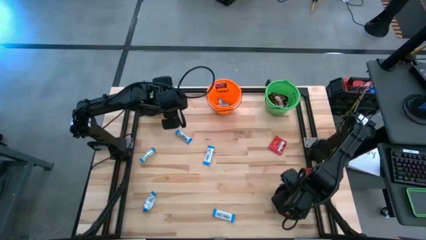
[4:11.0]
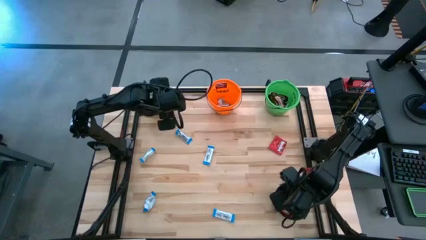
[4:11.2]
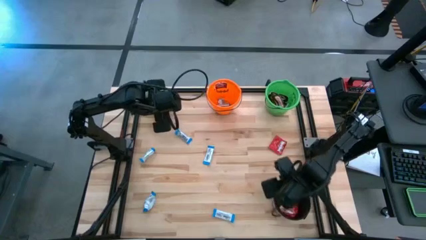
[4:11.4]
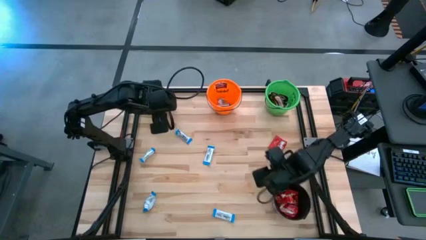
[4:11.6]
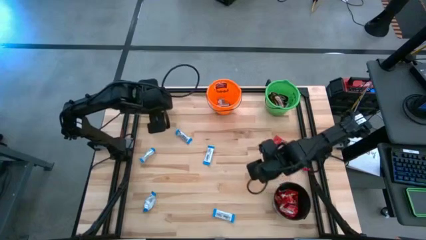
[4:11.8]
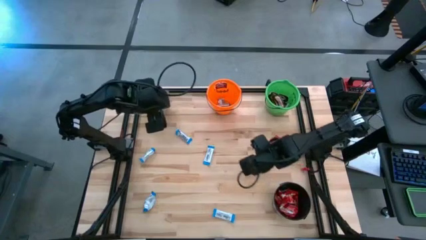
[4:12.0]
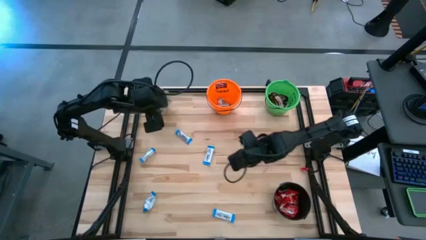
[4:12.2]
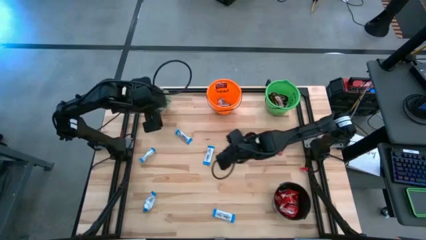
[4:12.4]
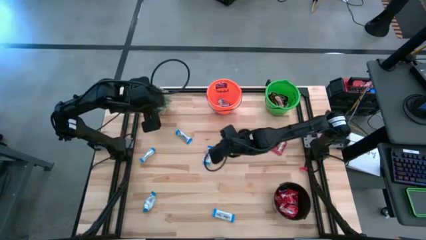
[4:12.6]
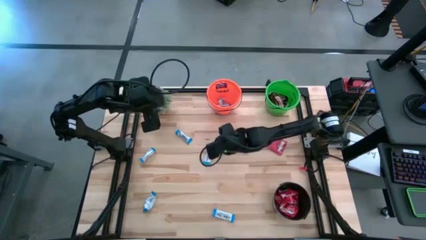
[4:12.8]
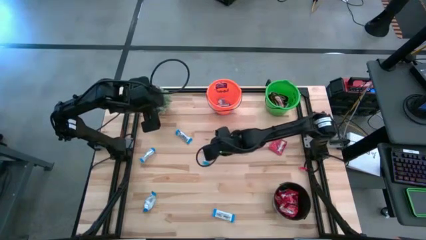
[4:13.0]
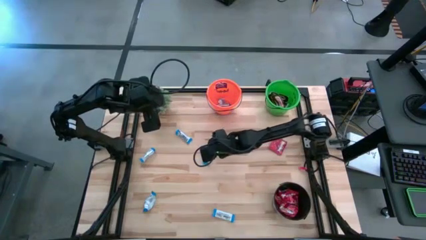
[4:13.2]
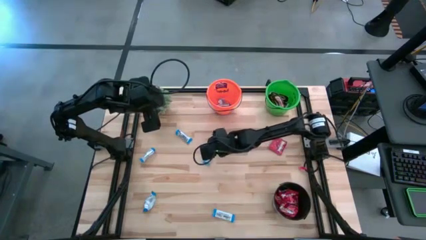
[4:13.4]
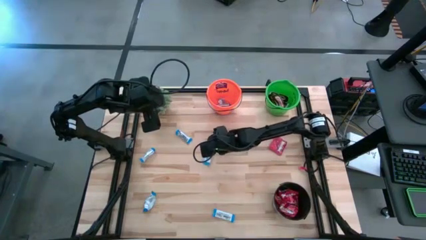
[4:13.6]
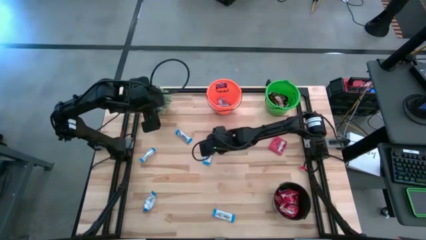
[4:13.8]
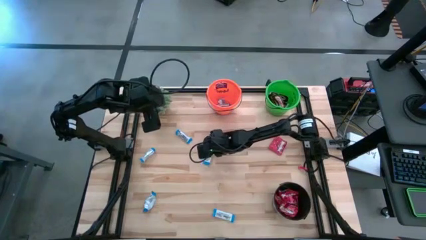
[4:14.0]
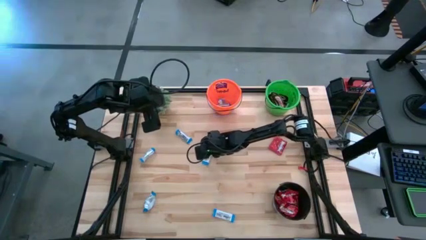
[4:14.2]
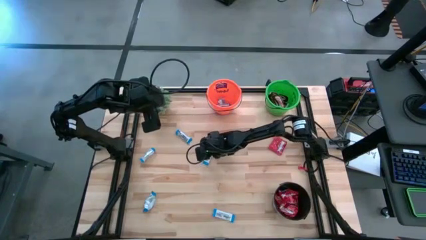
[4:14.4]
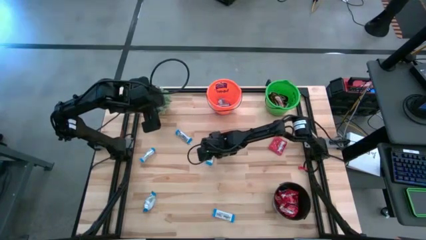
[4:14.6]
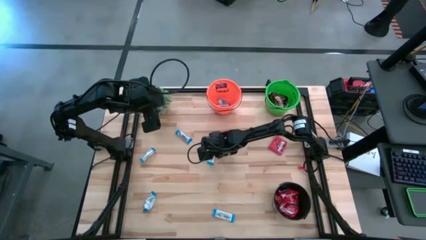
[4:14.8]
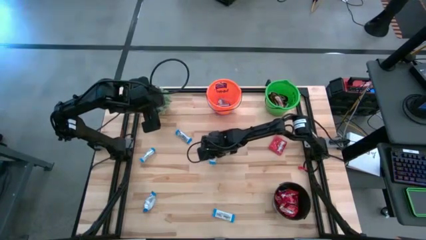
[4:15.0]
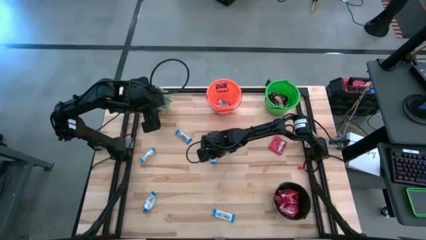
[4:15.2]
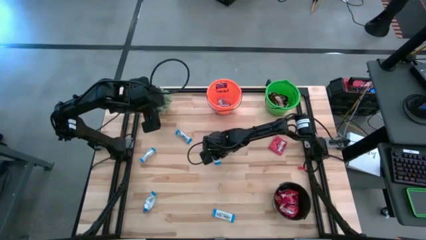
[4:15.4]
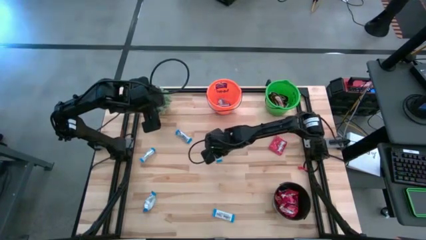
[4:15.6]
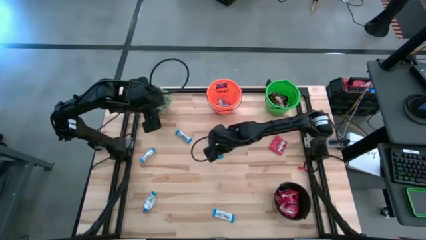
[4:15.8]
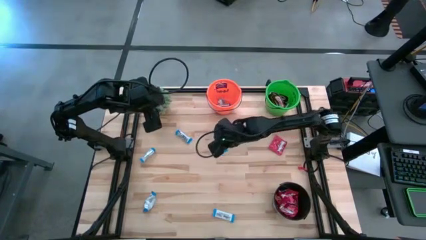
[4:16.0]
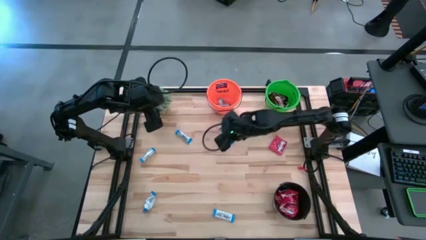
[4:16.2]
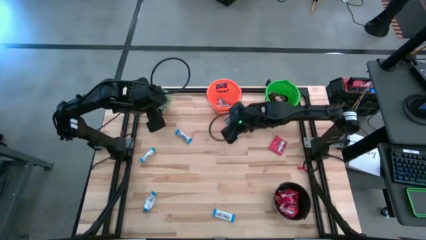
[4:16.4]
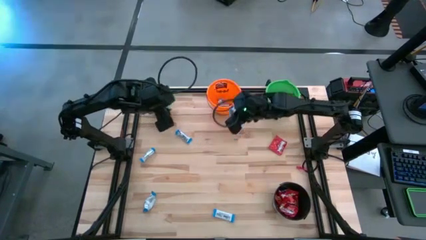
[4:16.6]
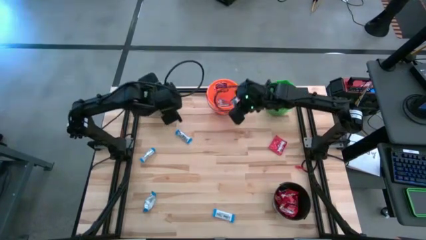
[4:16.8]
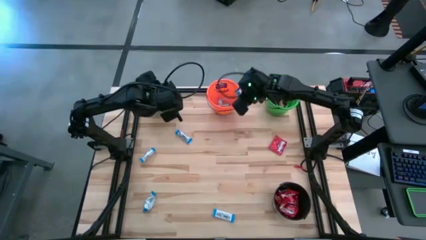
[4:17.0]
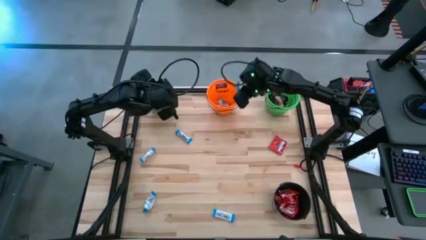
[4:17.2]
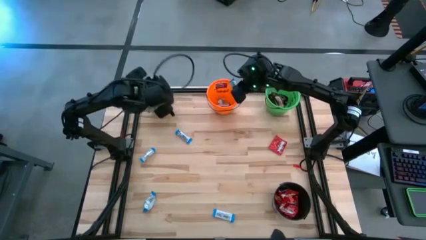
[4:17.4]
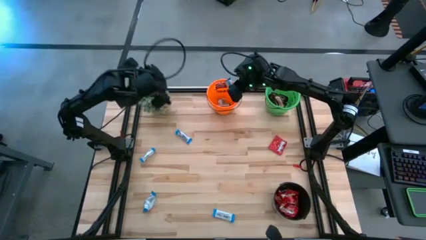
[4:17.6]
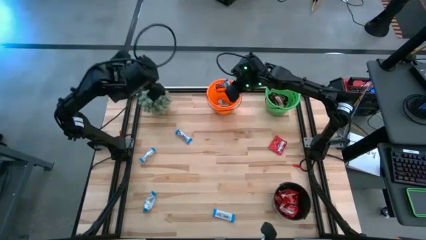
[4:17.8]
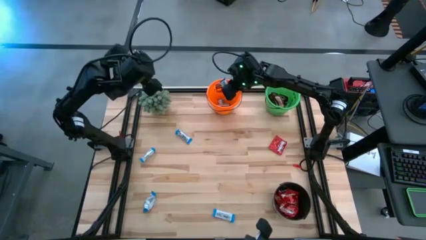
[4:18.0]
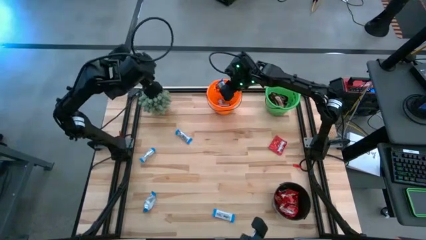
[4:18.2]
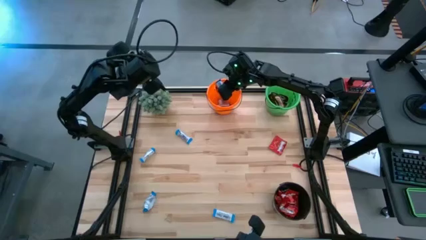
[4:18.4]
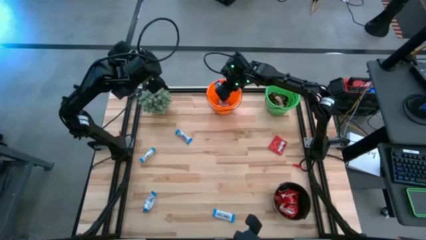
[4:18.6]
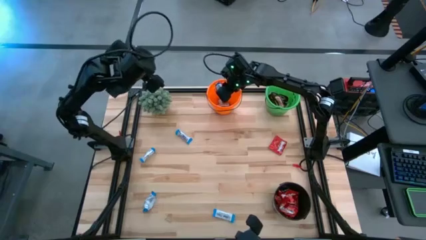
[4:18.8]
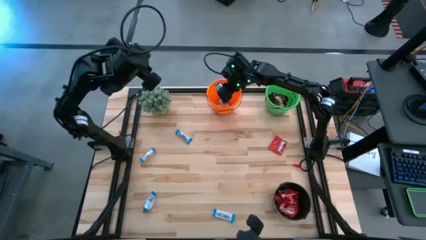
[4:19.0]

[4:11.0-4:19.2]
Task: Organize candy in baskets
Put the white chocolate into the orange bucket

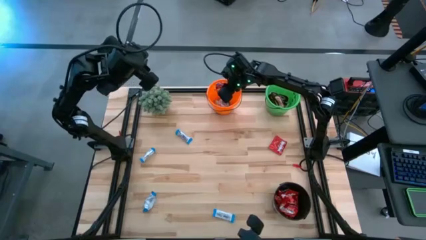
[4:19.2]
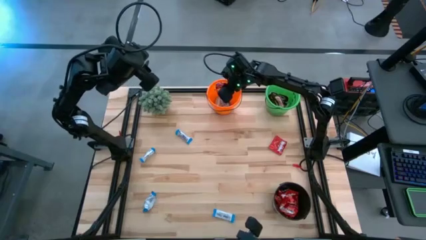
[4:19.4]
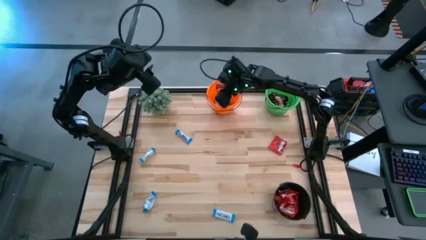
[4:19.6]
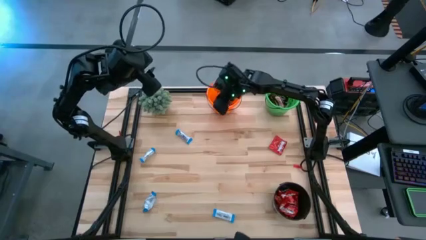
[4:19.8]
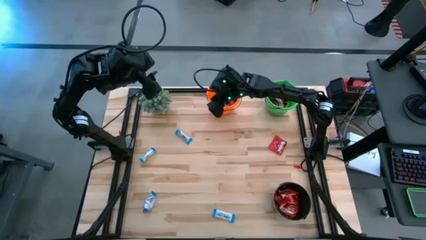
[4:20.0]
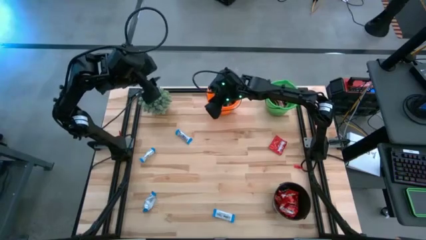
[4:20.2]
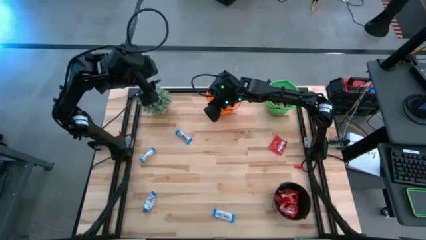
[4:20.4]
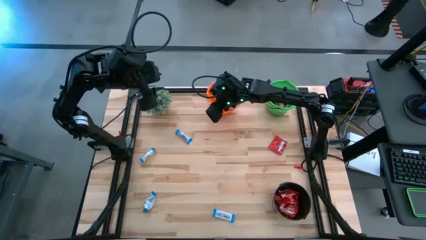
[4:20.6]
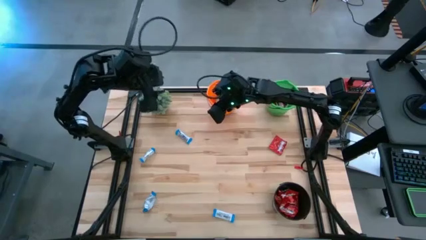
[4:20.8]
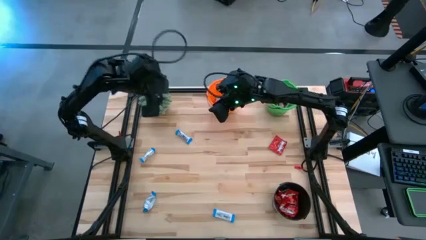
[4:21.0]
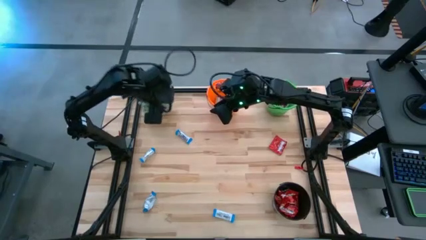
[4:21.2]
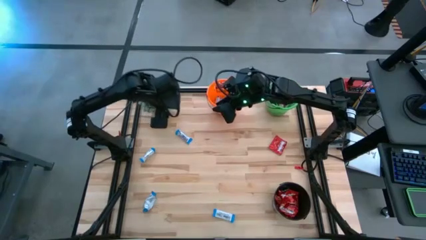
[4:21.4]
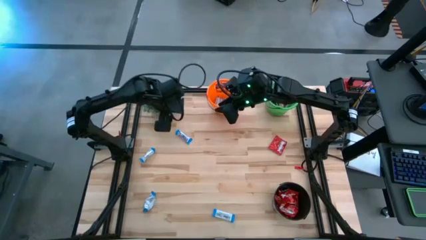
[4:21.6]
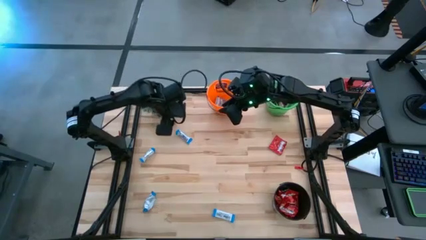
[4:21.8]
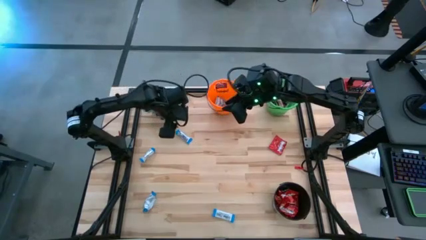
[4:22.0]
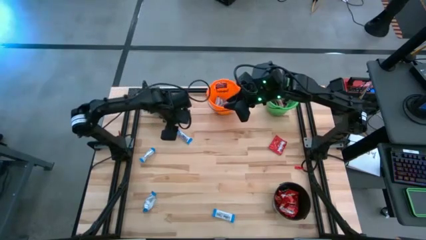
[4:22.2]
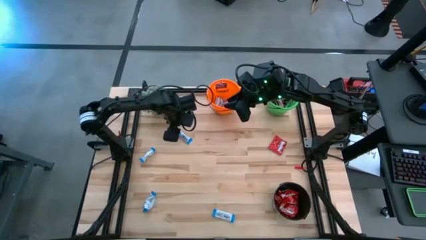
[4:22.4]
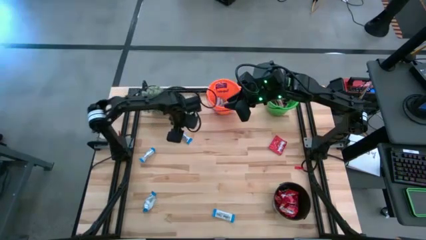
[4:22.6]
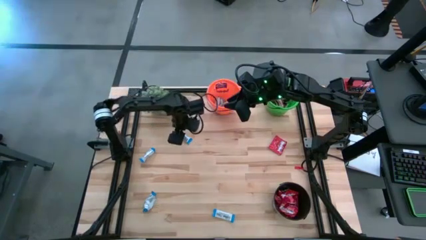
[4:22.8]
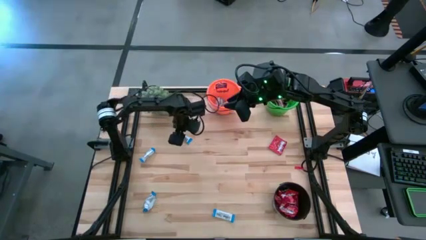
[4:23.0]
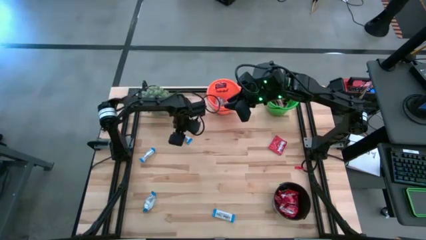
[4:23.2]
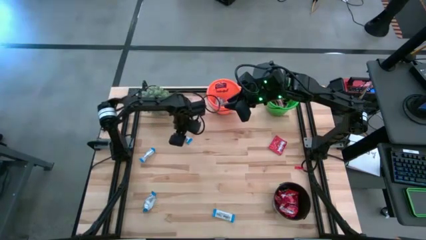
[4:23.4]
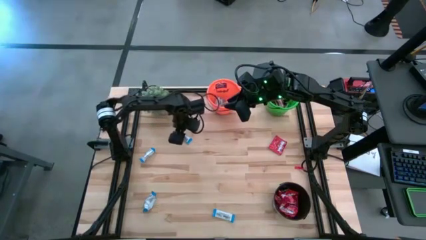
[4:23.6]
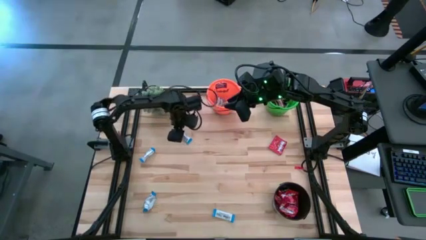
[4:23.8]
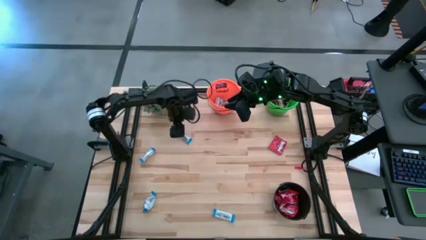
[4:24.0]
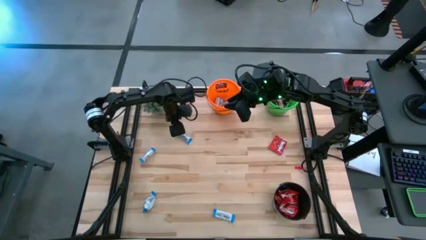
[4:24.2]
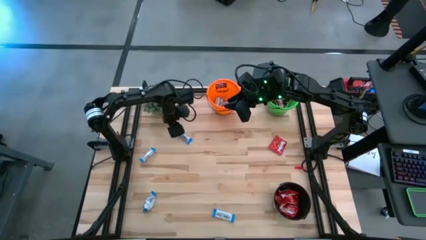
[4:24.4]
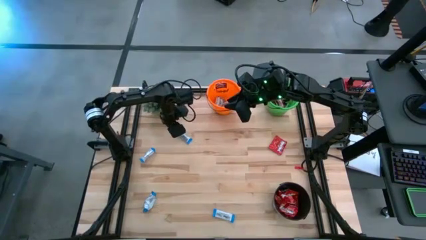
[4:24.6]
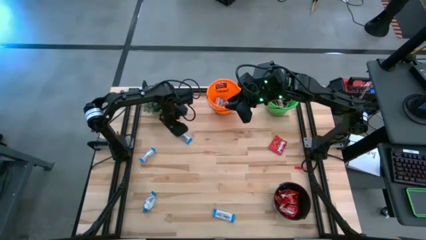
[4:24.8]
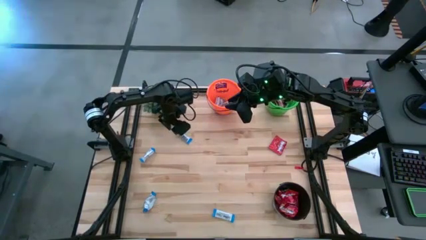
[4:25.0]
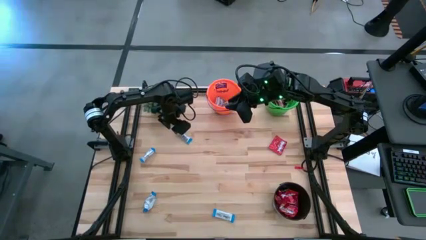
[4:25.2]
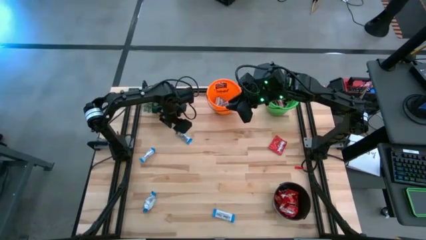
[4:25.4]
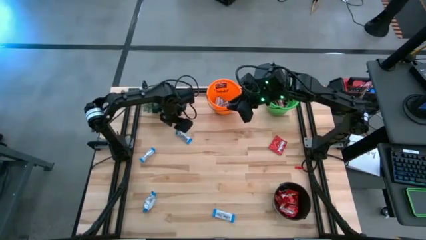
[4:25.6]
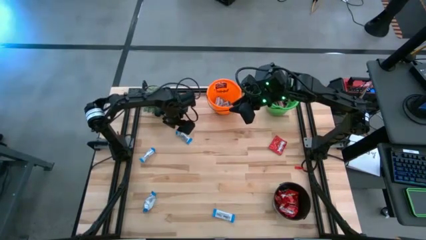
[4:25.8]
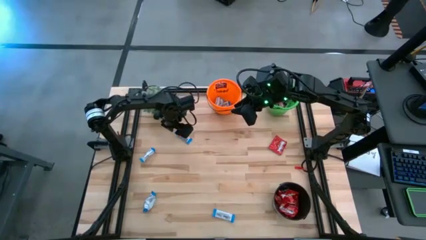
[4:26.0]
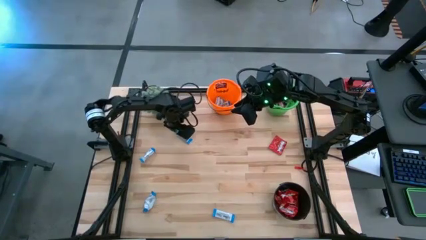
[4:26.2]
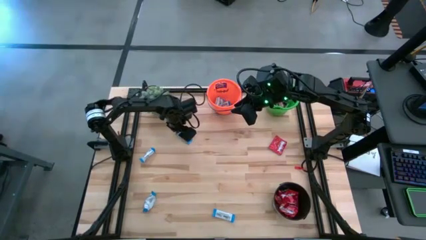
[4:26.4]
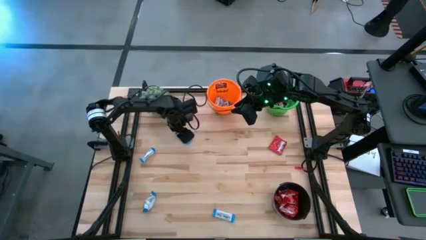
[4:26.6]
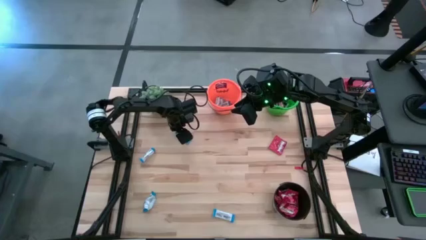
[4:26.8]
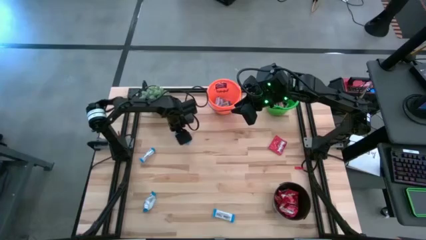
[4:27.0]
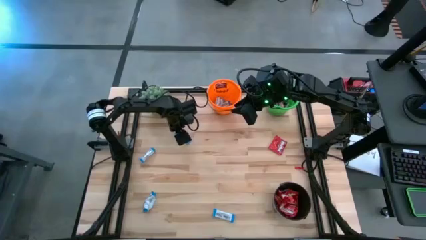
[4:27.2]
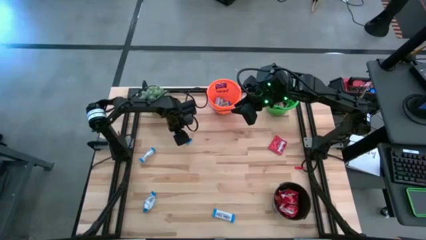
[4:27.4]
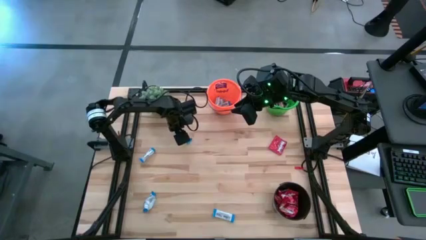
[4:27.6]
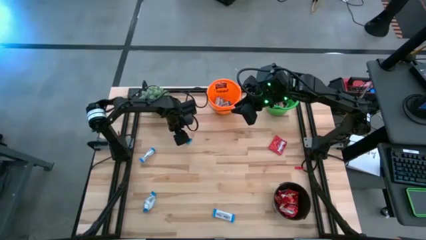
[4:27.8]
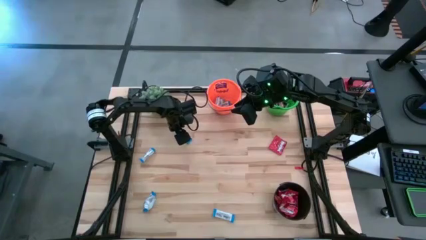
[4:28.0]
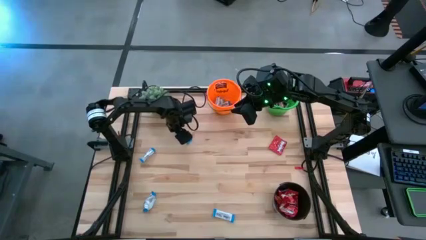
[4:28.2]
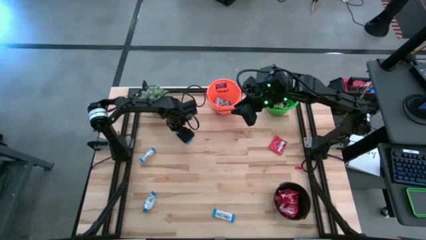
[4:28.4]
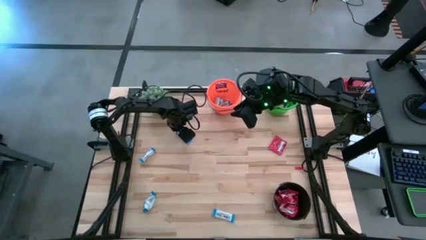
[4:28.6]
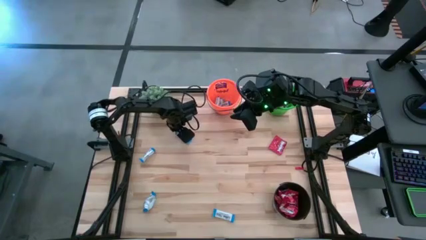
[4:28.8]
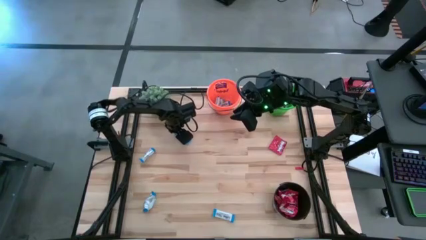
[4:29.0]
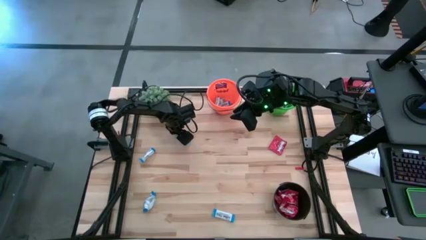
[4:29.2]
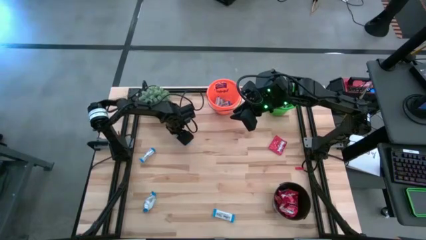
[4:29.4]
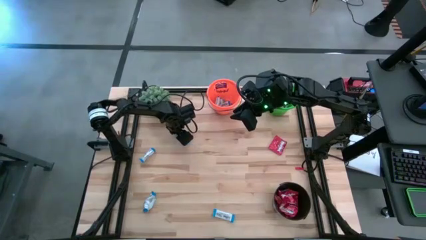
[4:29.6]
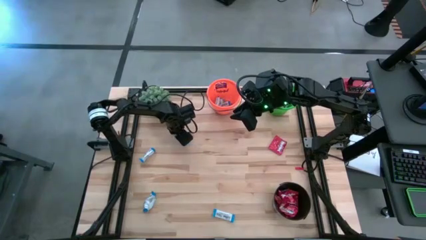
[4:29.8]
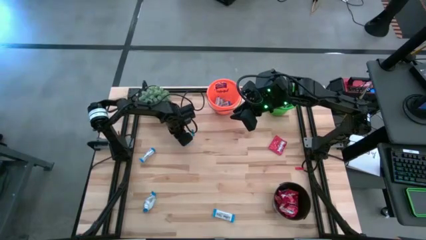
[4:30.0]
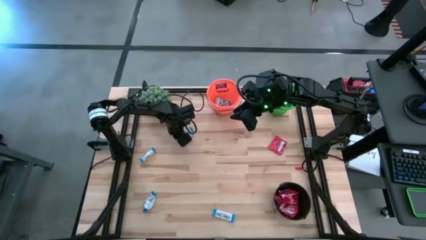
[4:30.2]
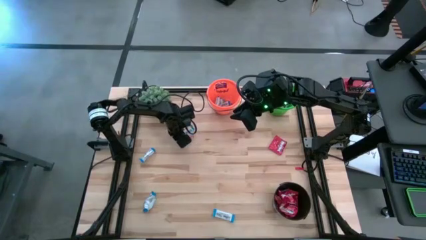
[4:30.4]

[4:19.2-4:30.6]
Put the white chocolate into the orange bucket
